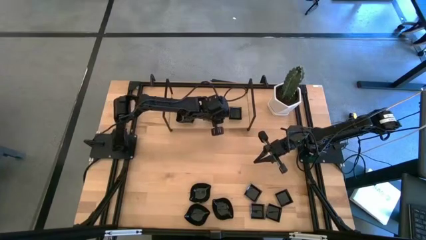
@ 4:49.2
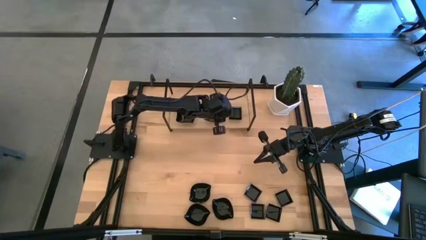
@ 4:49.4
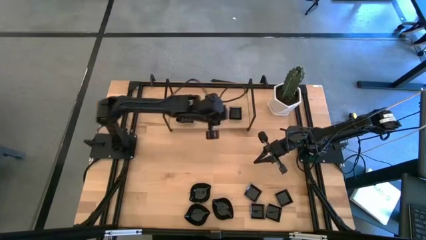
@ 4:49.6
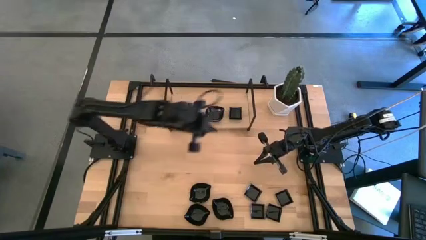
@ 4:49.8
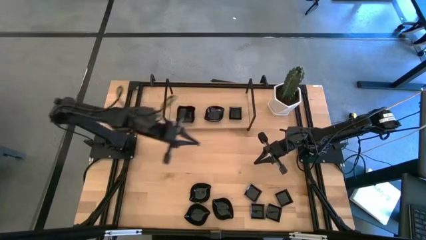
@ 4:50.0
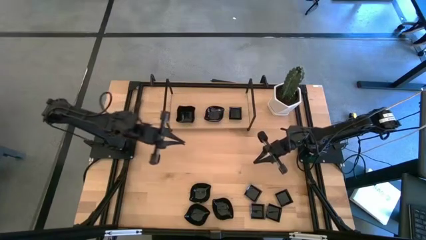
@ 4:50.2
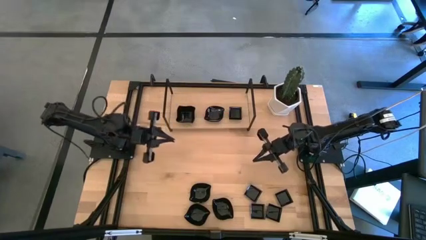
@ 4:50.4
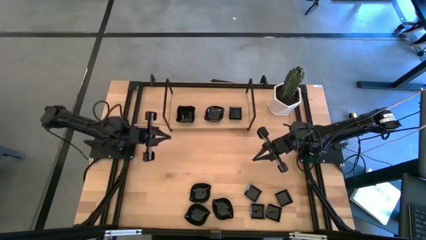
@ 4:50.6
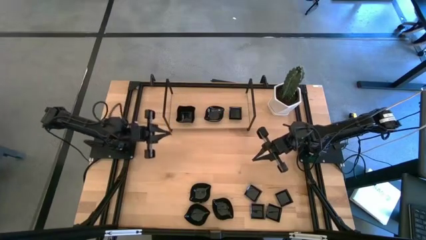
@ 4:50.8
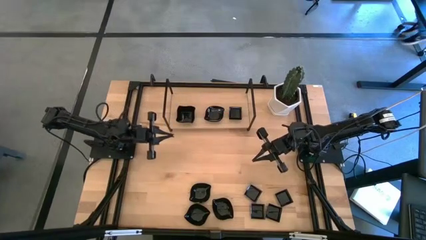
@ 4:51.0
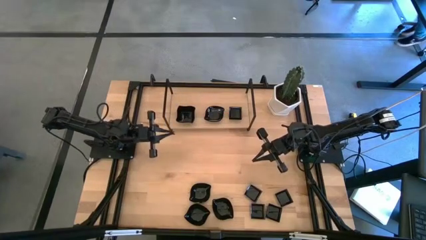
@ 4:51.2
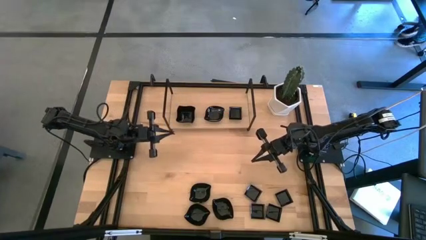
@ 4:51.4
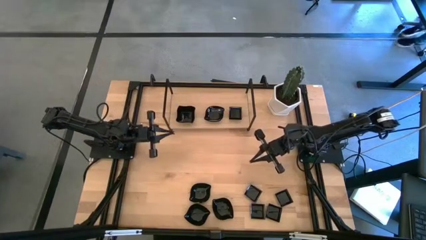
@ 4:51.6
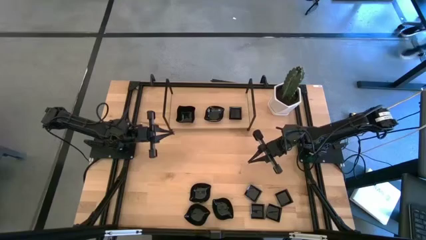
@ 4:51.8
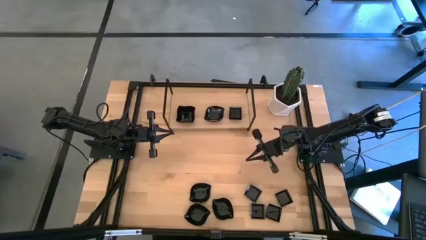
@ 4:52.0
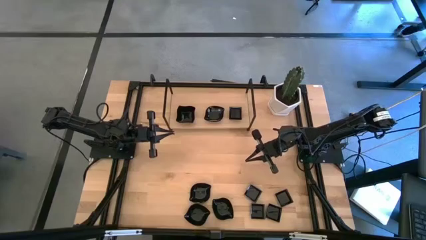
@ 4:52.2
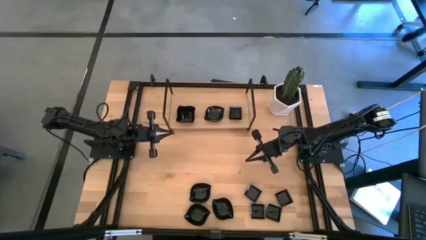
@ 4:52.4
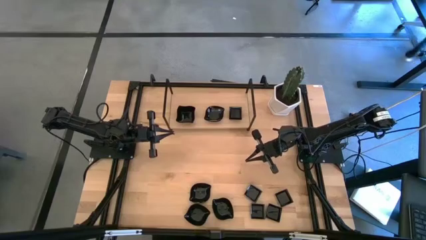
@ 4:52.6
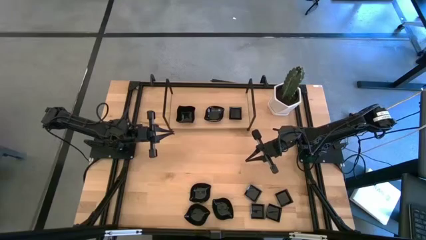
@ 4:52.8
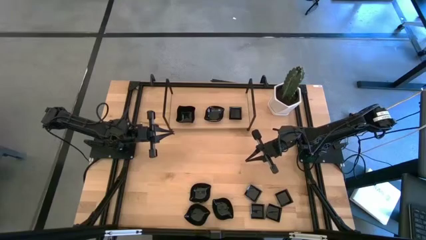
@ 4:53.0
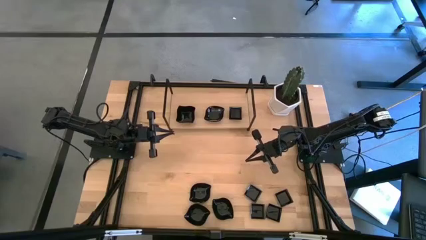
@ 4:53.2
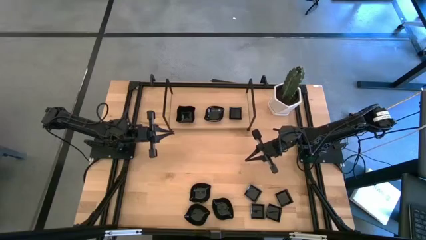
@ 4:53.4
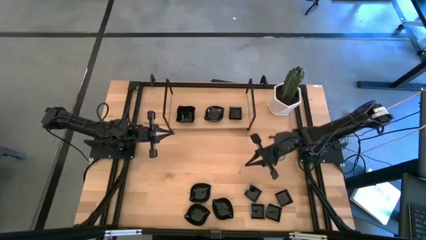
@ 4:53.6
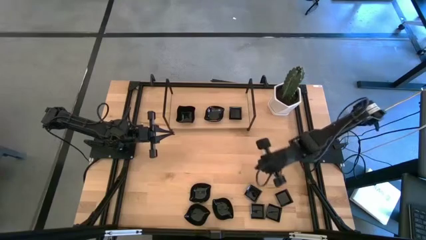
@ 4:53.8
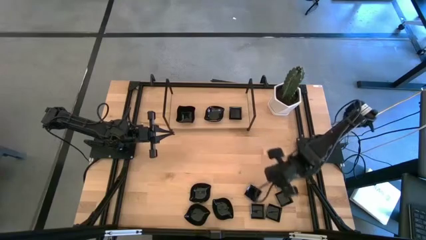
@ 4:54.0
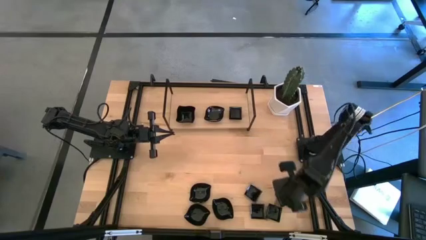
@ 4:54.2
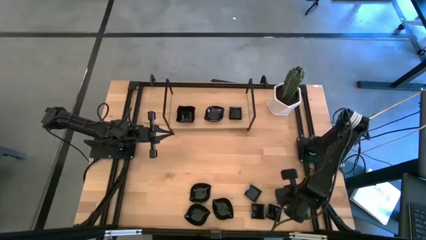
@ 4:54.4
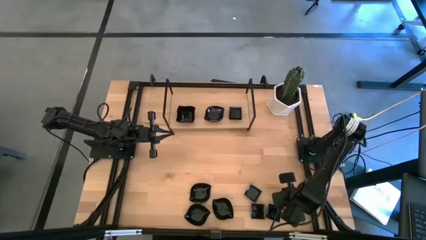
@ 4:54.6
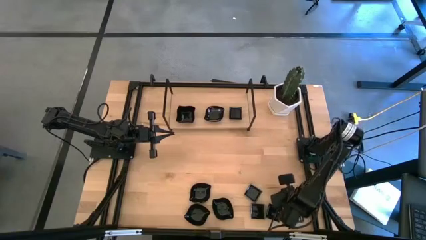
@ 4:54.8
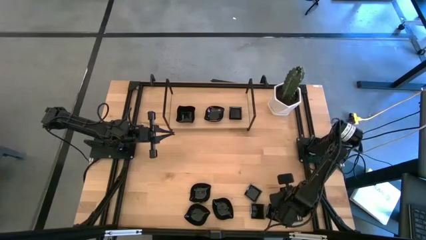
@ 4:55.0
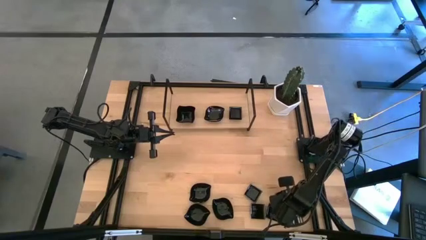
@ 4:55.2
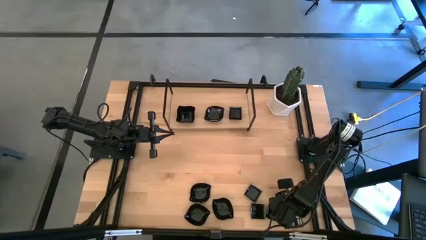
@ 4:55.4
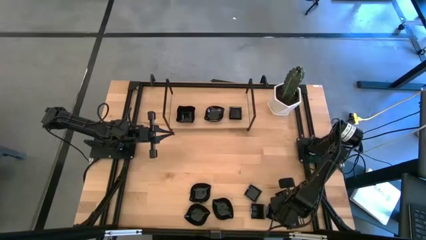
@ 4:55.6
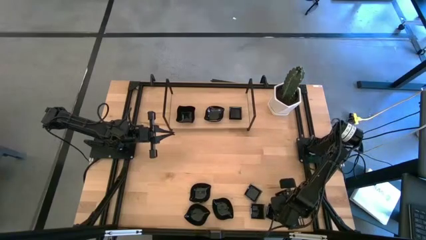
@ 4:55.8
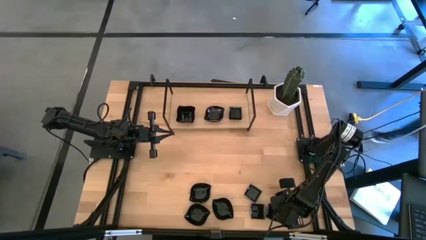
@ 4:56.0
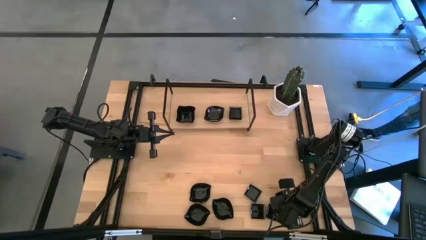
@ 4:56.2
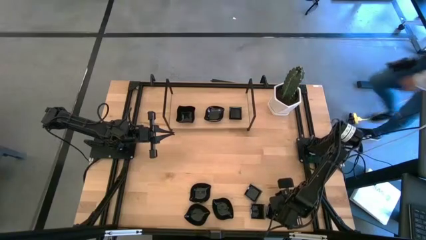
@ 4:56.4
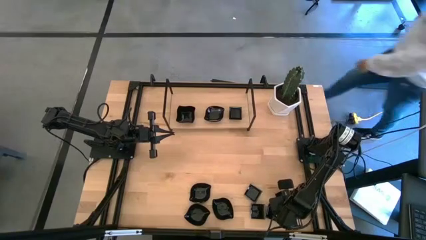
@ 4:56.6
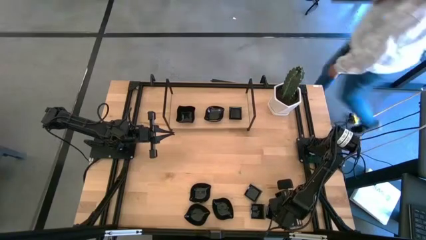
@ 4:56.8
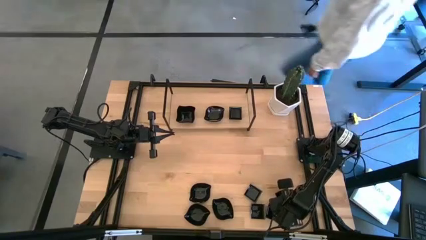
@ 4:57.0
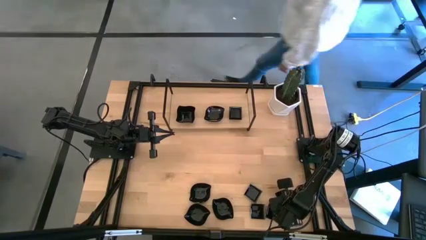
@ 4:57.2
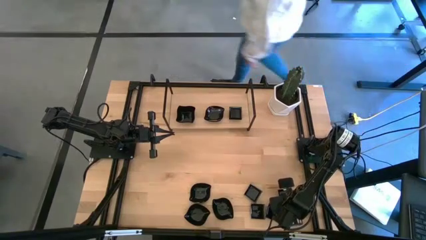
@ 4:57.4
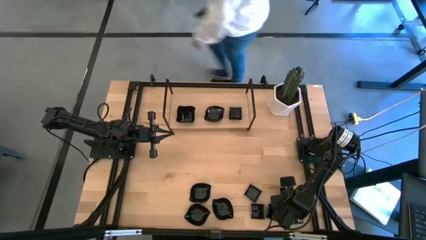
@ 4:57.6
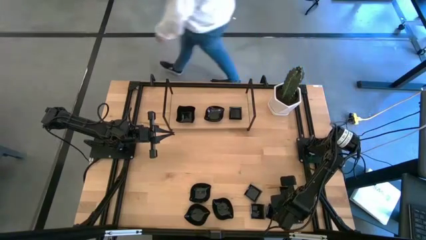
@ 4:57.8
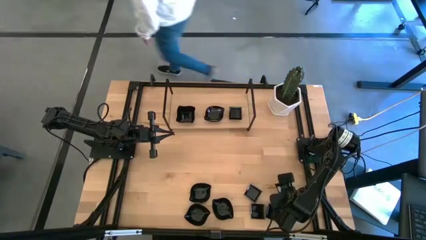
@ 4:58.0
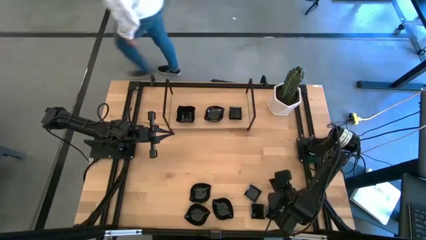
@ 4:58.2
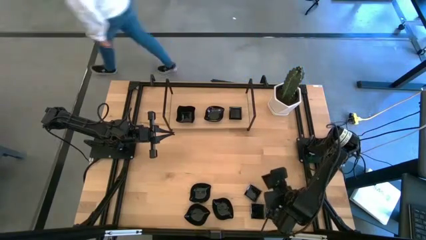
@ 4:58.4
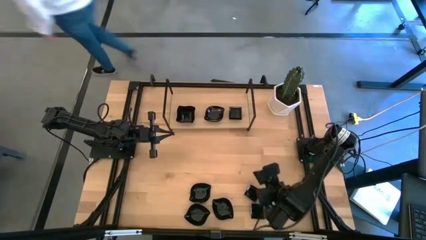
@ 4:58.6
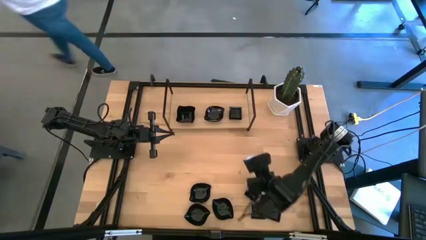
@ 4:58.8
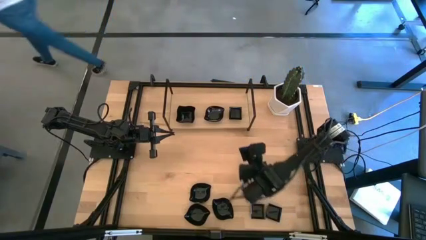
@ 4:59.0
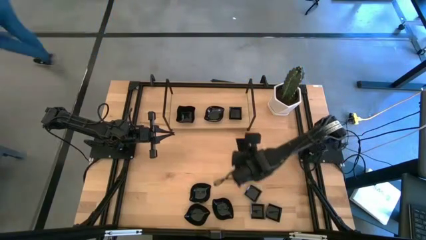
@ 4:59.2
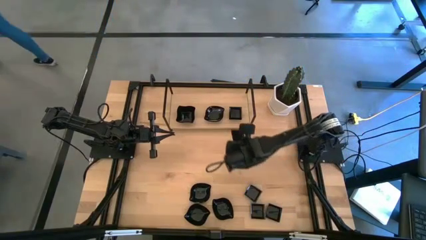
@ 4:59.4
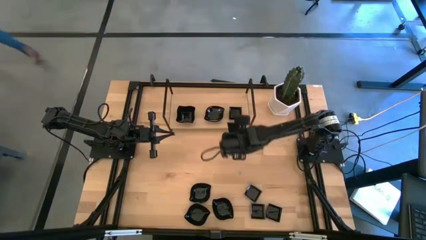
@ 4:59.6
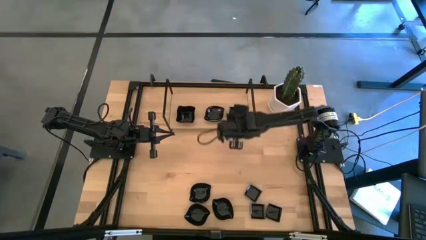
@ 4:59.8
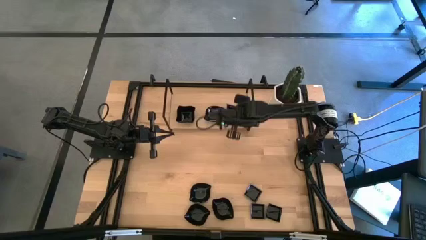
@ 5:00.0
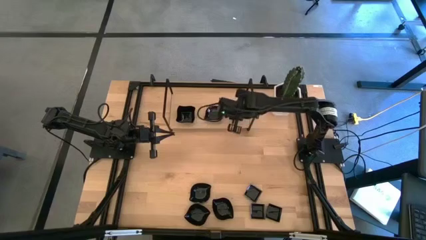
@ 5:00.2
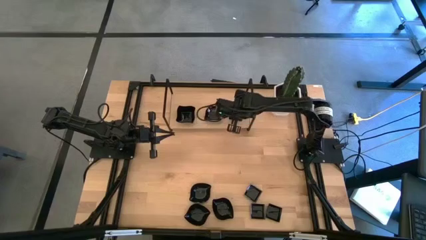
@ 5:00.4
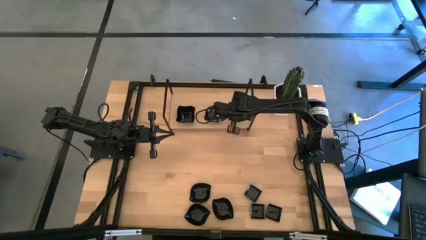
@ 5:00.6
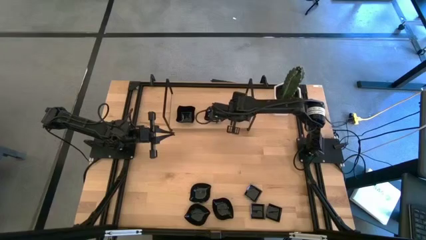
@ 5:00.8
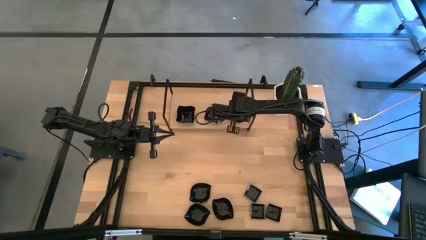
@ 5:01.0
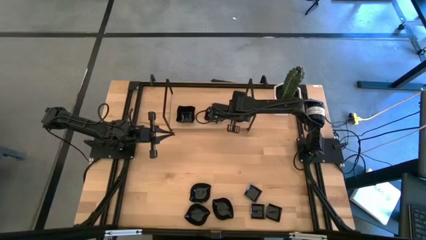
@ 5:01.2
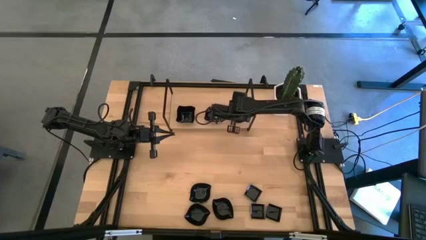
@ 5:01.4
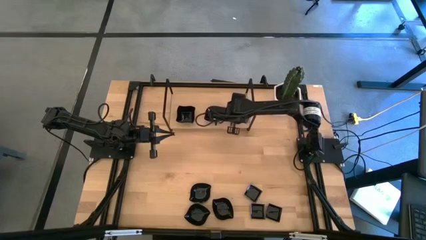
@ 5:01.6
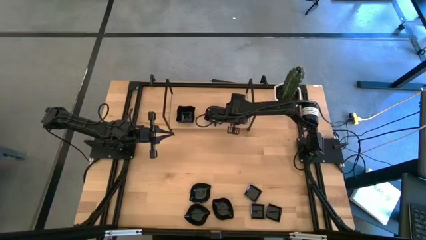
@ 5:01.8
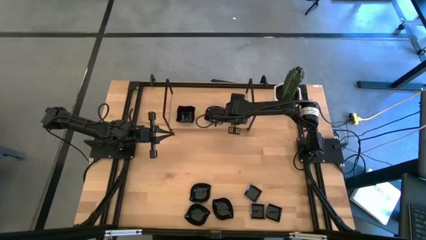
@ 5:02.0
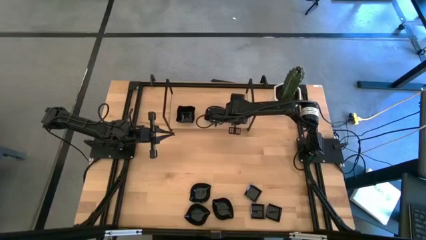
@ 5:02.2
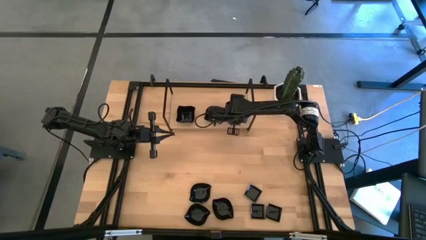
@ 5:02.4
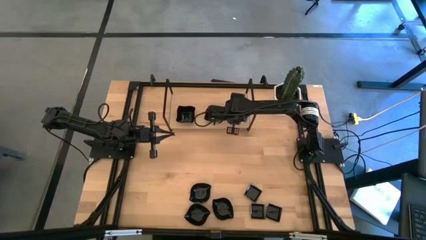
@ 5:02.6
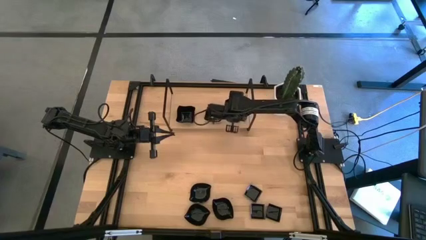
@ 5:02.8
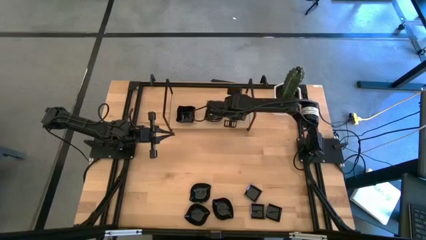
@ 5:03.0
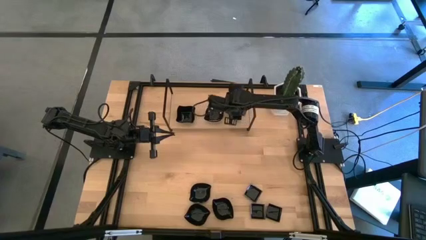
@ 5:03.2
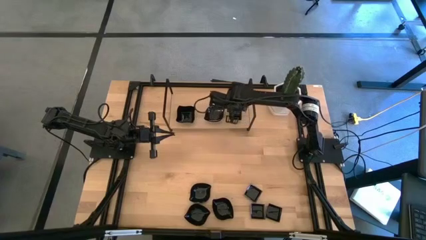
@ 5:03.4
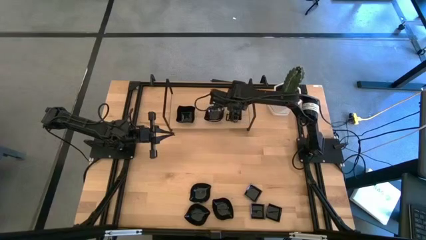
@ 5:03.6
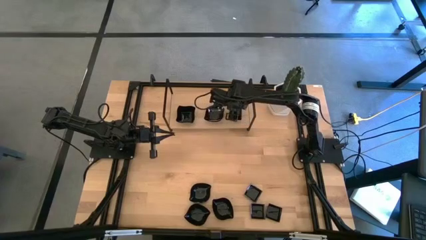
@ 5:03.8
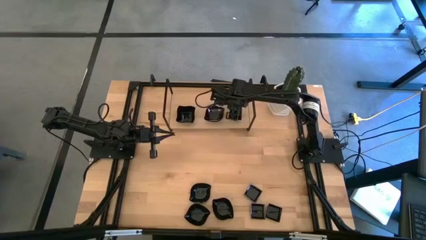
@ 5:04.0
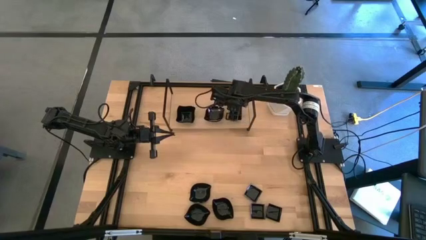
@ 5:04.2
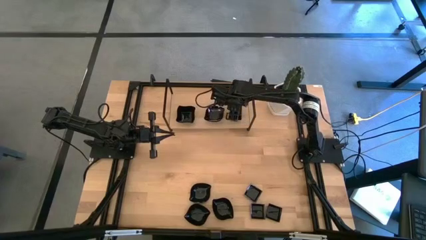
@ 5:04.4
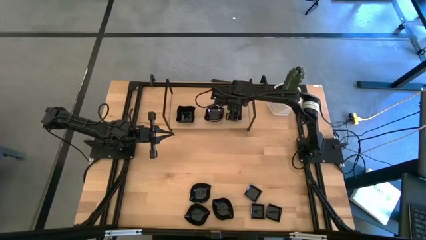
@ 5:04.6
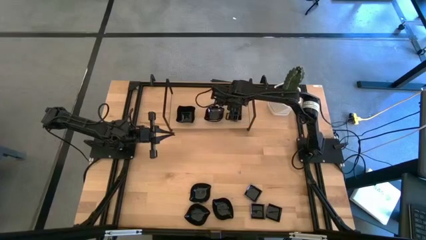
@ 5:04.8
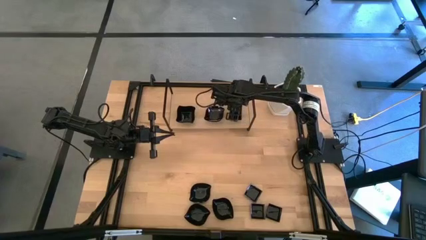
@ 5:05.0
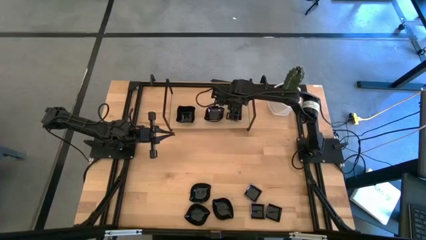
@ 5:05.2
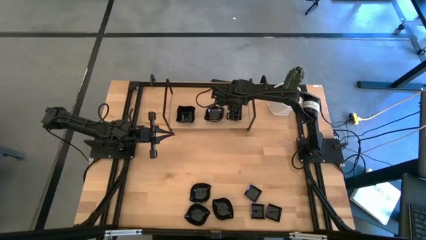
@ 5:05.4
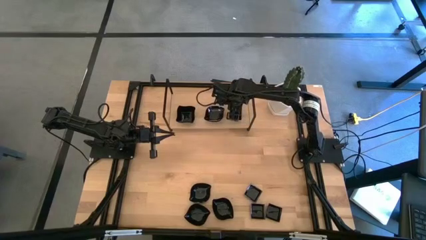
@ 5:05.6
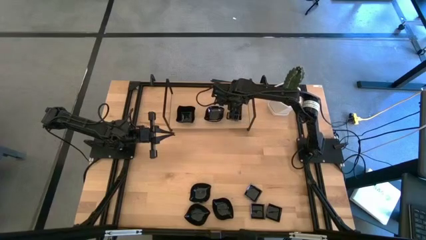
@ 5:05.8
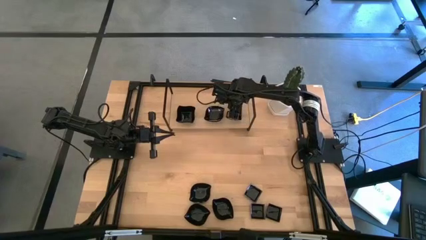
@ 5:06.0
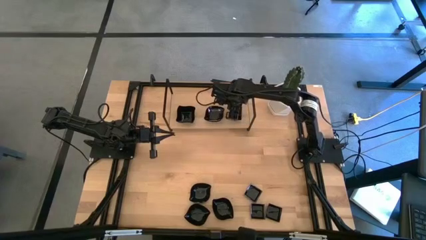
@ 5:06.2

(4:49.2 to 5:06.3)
Task: Pick & Place Mini shaped plates
Stack the square plate on the top of the square plate on the shelf
